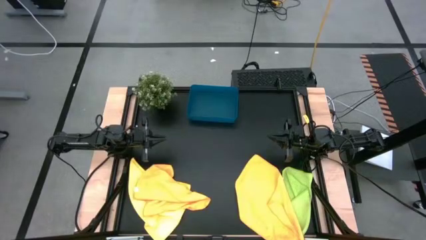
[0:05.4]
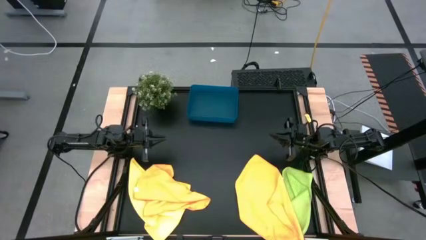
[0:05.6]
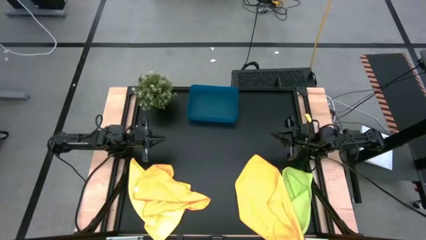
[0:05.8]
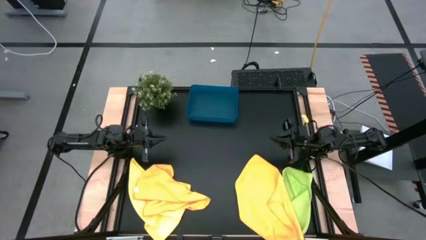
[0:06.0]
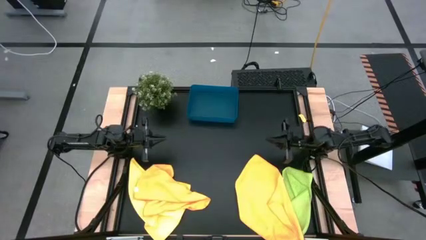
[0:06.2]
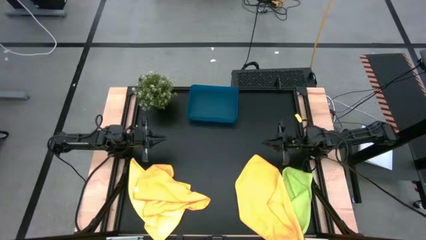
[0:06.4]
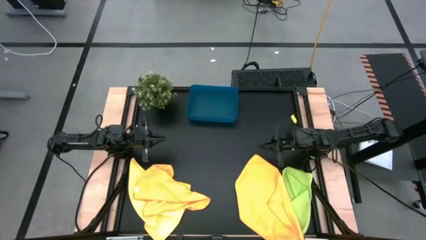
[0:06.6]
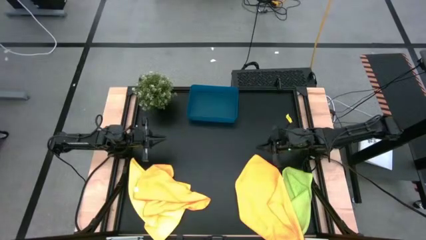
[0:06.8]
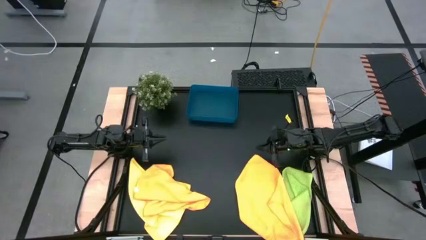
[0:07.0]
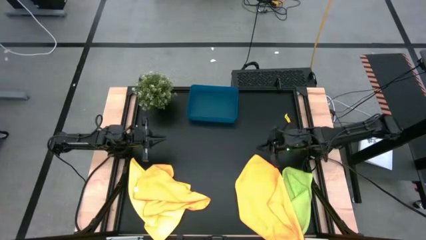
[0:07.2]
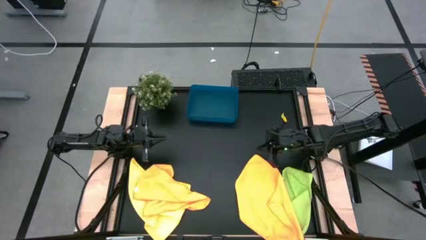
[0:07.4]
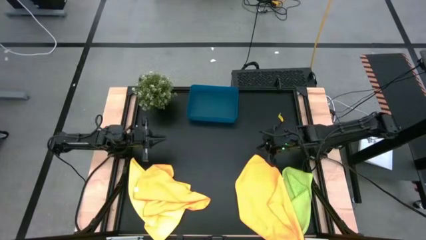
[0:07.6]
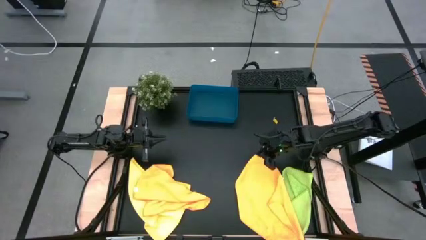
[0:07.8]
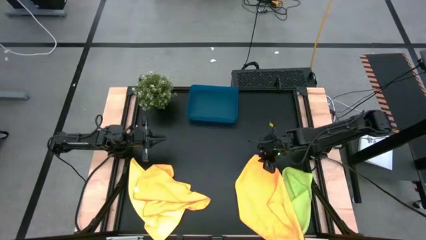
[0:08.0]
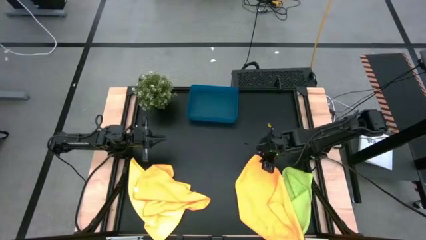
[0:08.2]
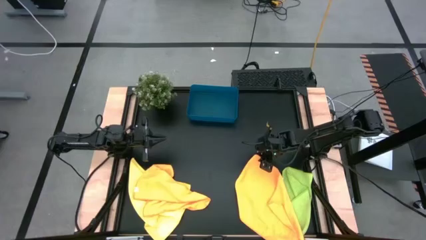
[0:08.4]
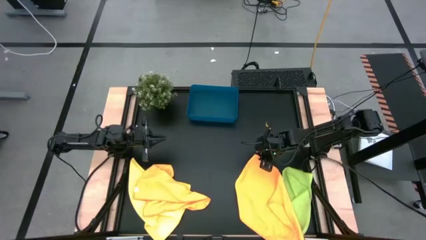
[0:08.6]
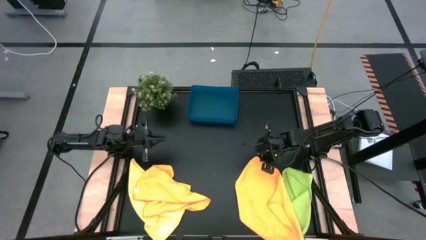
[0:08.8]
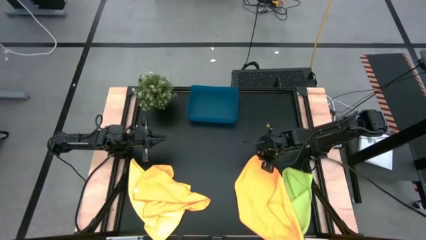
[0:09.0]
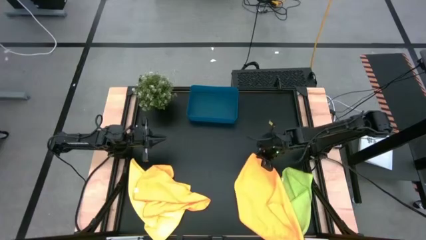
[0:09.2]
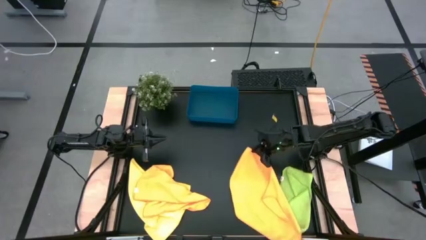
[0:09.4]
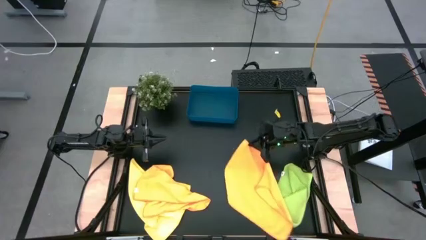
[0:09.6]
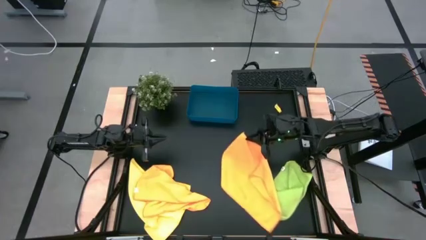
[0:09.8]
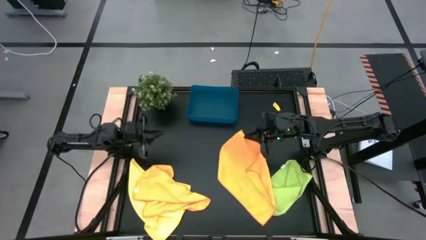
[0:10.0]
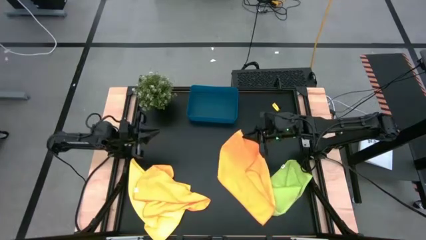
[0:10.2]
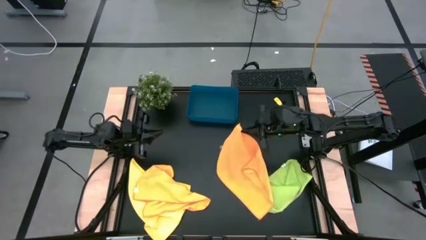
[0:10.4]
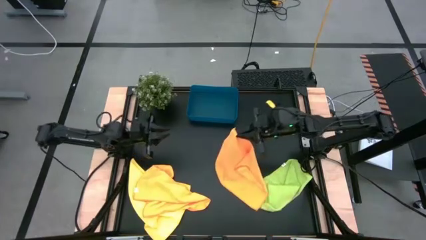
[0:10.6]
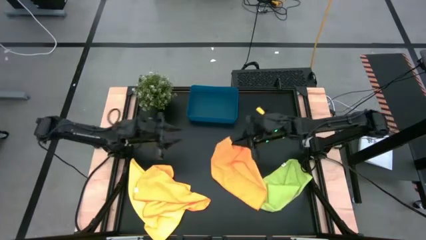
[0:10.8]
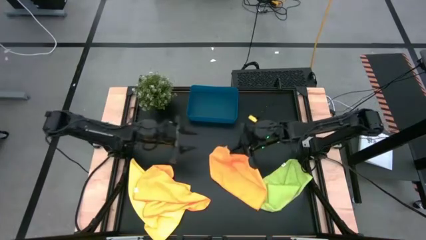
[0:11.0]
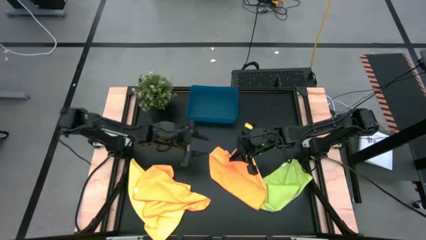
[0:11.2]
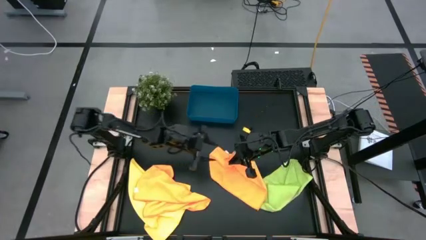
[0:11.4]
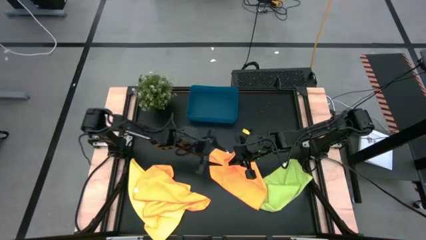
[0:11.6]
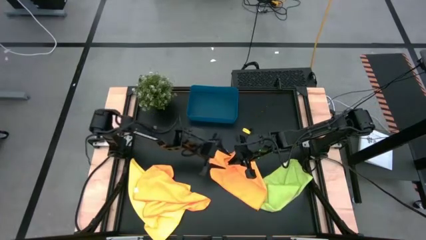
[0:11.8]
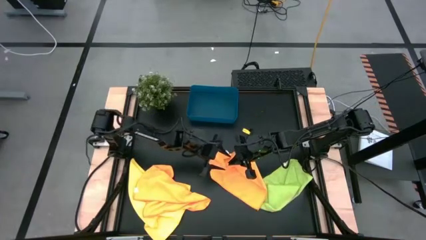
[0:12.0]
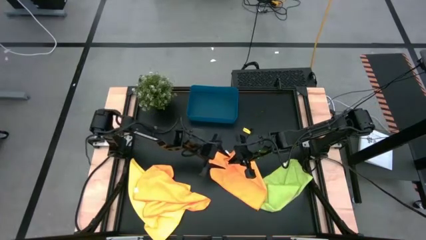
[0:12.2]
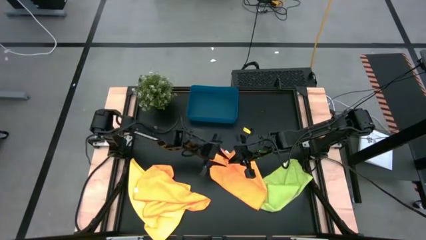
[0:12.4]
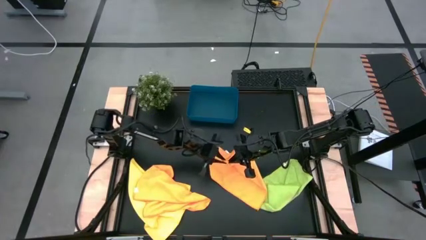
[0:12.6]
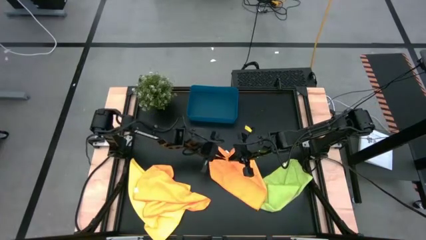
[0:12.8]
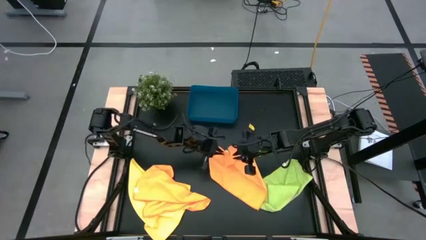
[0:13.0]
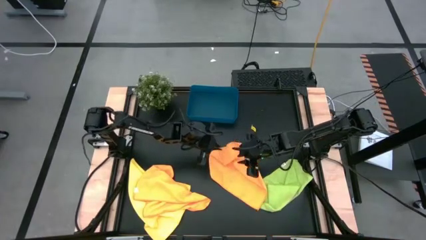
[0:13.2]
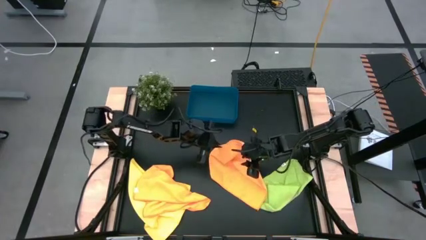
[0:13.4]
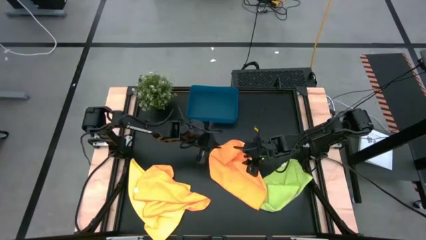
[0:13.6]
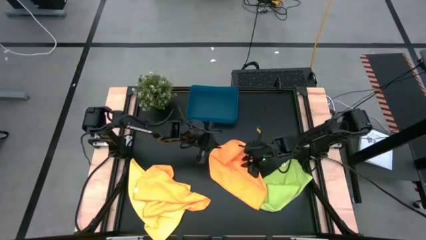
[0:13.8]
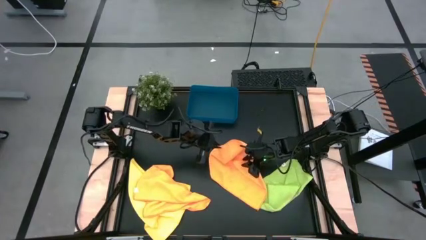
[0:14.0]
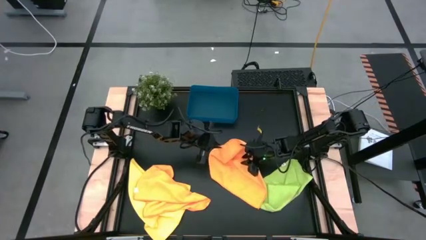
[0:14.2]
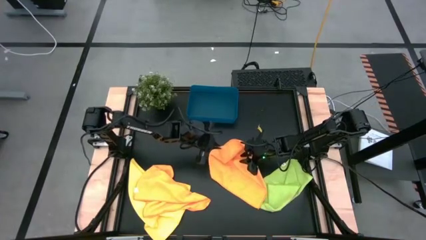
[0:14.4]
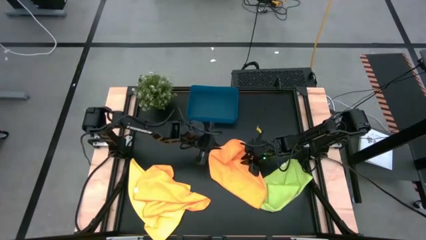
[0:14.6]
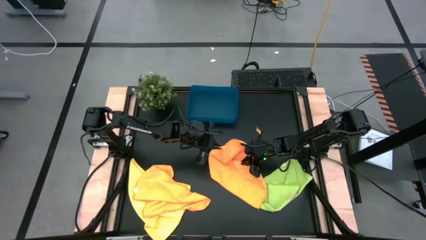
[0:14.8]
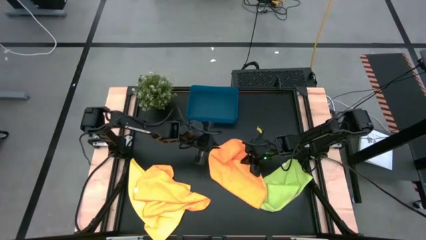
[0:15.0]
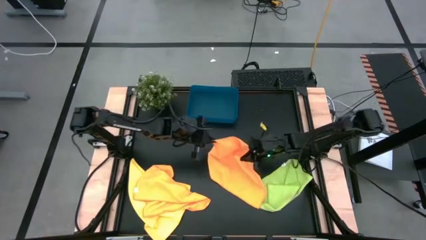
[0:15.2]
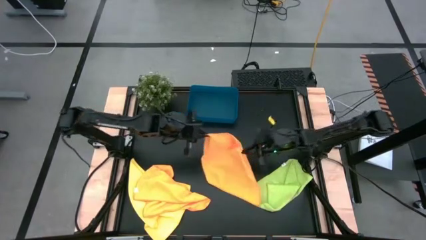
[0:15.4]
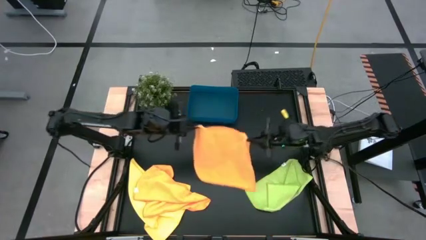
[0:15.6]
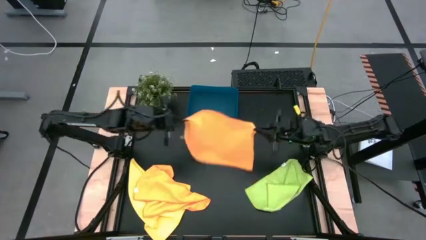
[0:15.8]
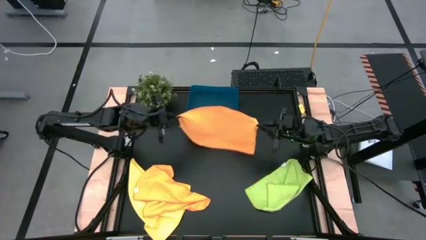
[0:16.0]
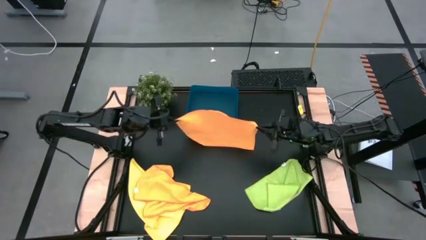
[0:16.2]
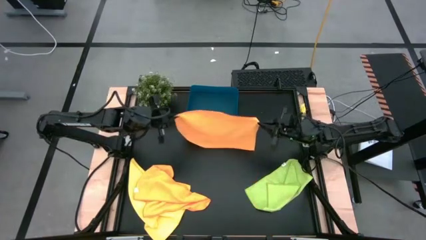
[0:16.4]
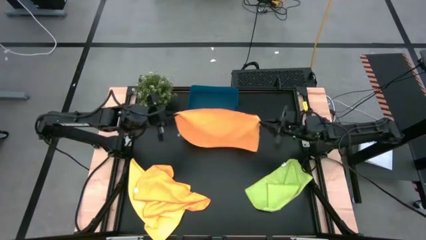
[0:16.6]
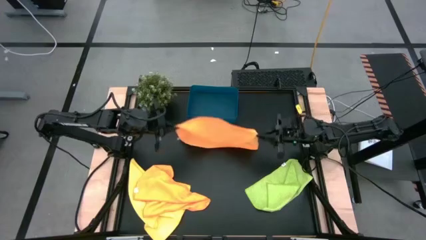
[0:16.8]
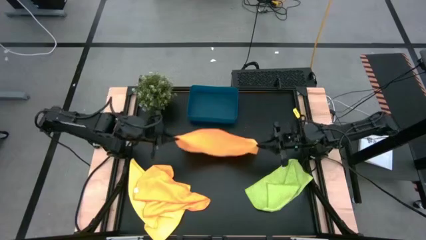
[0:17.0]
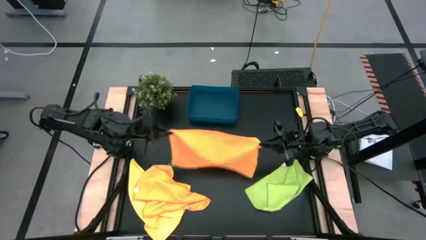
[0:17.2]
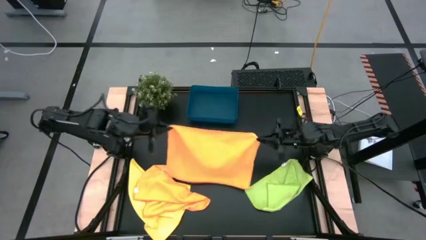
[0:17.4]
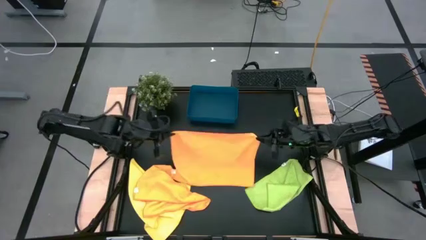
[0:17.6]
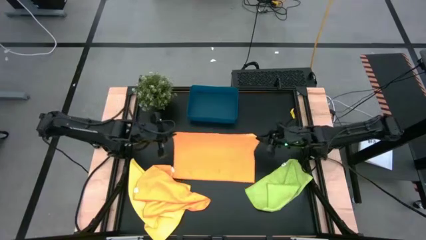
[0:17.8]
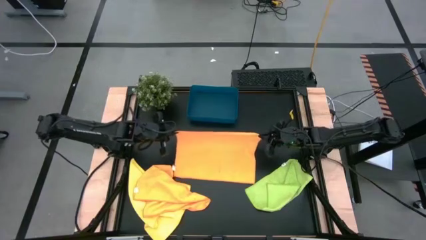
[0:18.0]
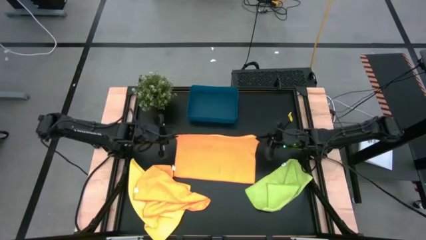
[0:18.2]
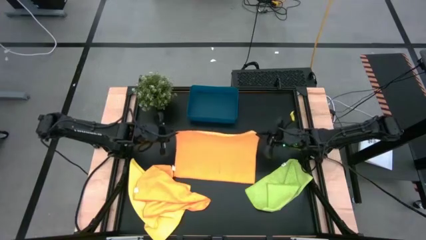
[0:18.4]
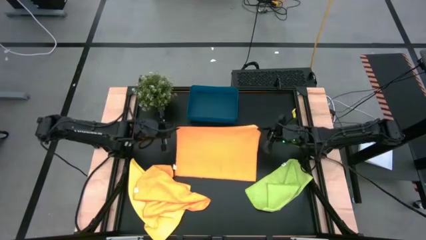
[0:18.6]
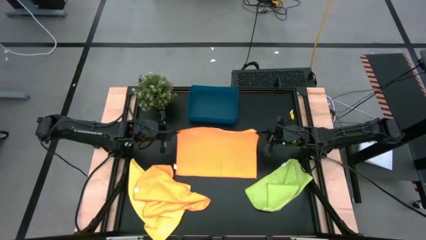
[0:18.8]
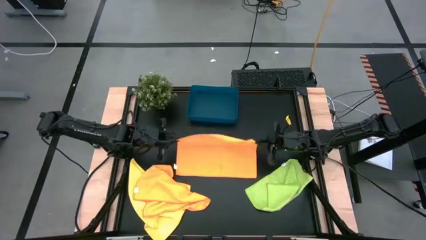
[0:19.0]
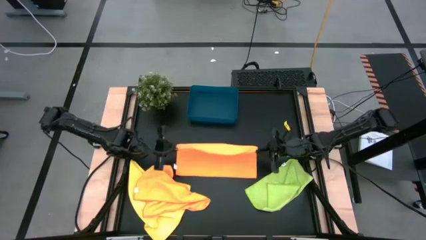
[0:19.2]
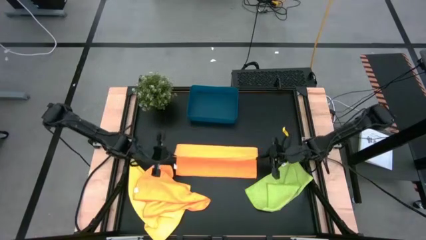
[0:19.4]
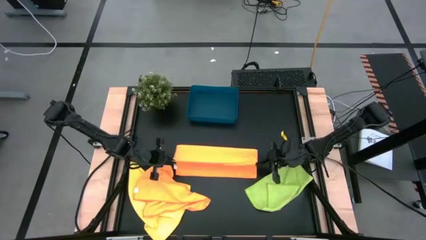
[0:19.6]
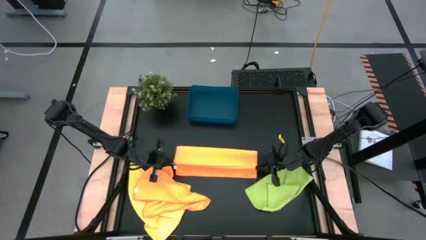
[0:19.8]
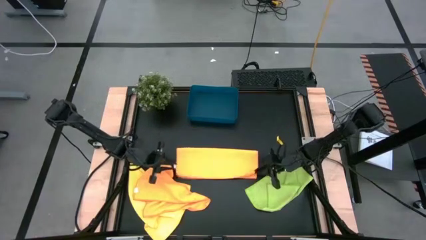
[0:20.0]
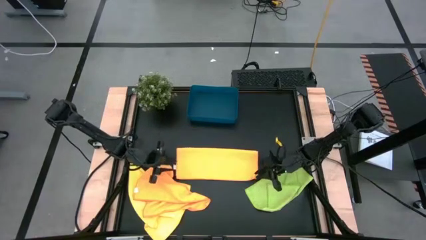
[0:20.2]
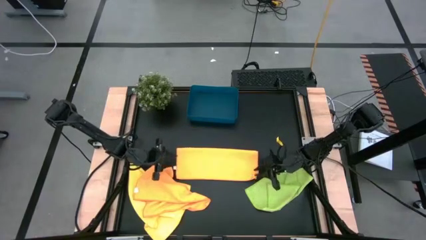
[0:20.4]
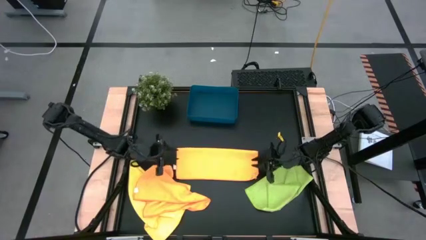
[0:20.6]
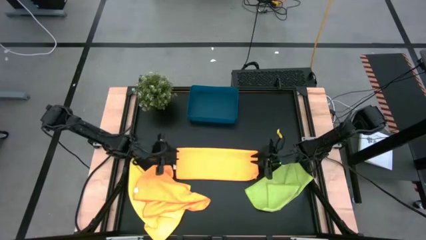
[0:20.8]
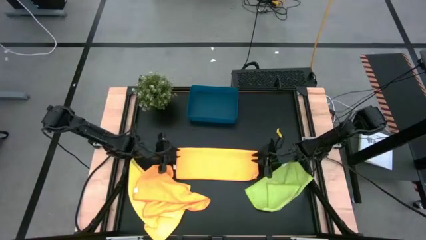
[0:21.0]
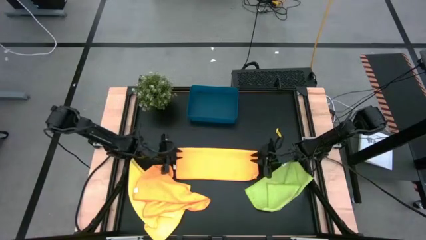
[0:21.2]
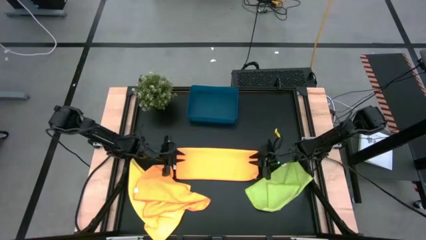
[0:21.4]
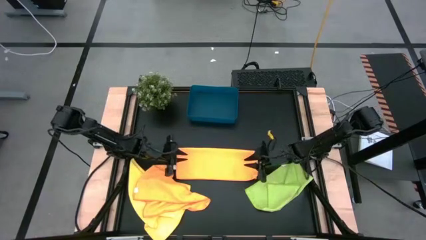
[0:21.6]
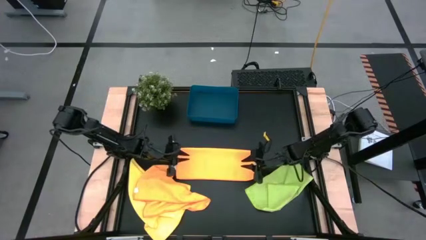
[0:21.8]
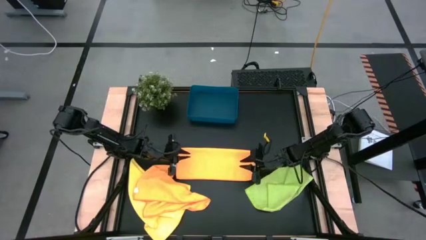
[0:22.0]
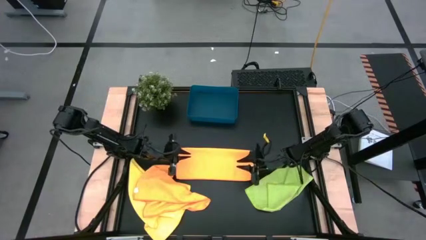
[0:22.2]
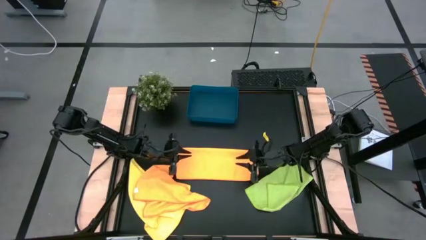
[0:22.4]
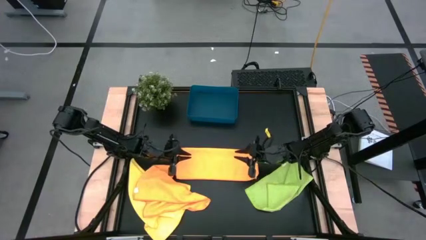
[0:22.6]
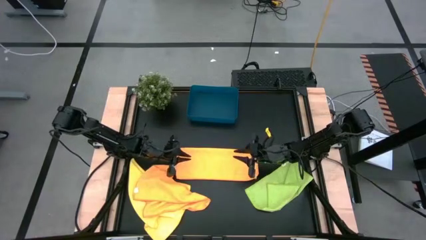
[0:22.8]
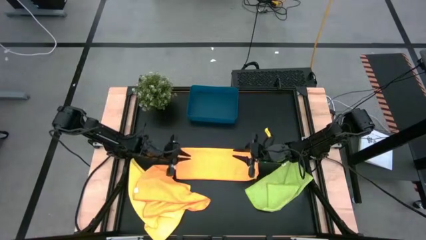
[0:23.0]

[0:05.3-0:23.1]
Task: Fold microfiber towels
Fold the right orange microfiber towel
